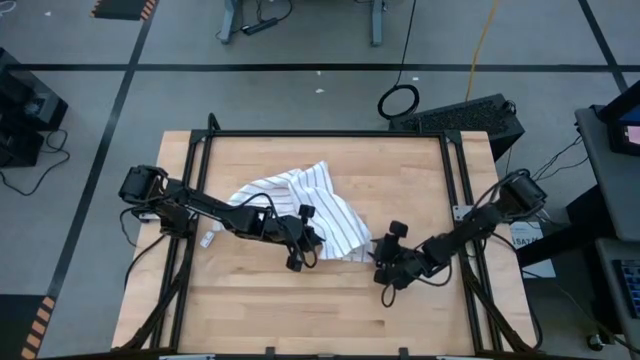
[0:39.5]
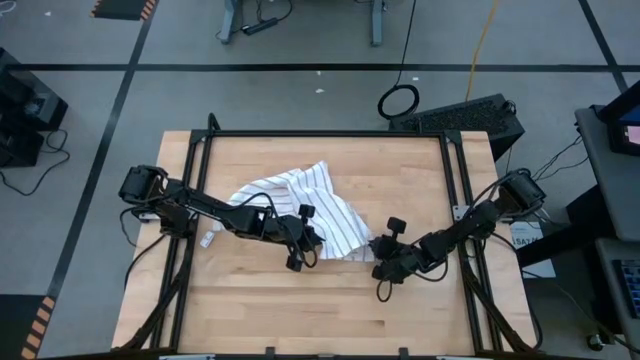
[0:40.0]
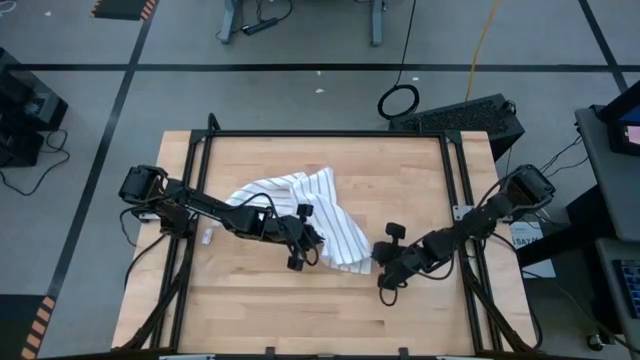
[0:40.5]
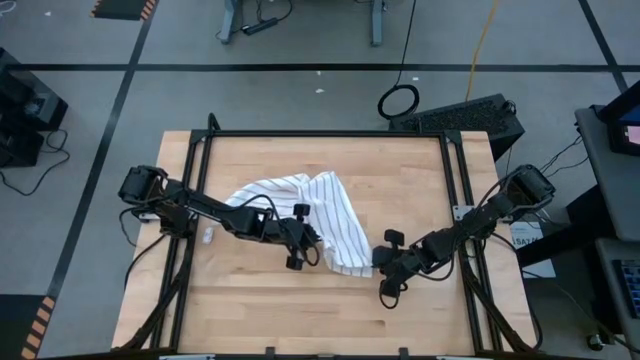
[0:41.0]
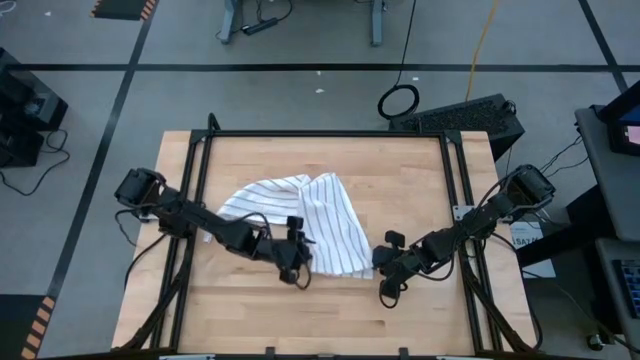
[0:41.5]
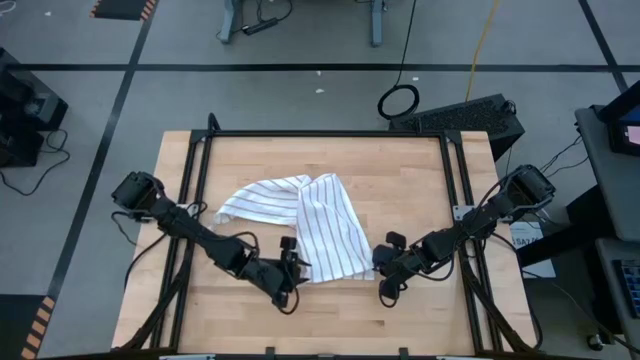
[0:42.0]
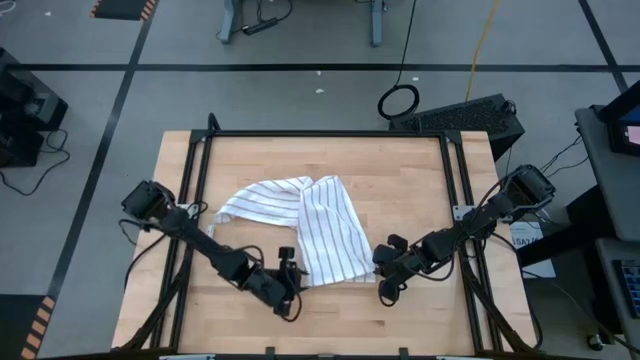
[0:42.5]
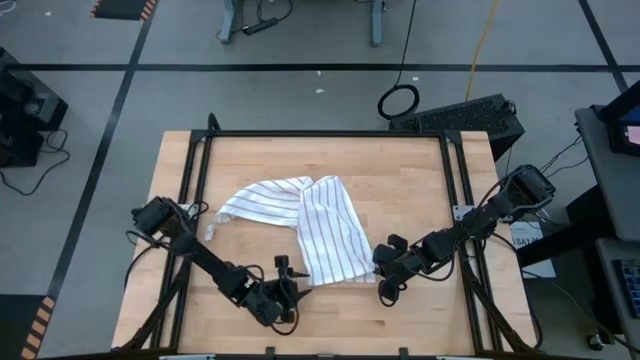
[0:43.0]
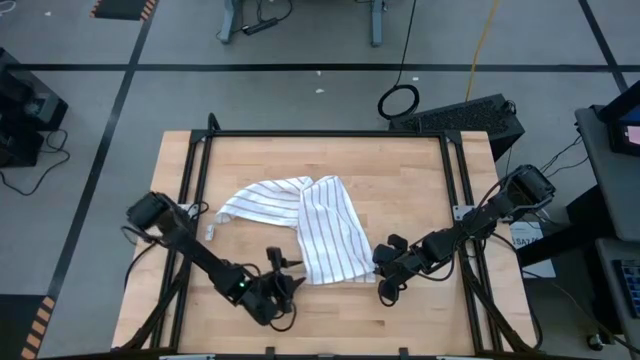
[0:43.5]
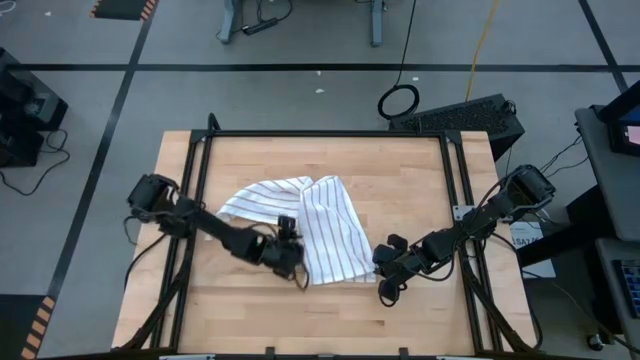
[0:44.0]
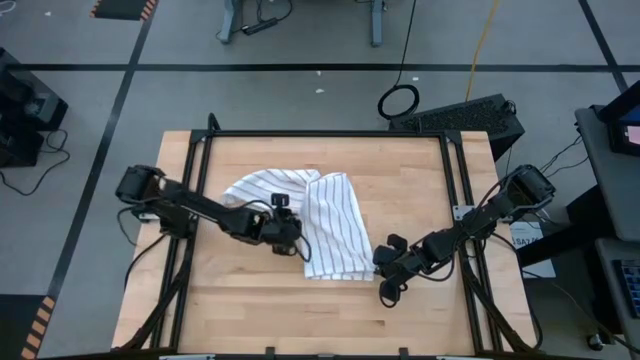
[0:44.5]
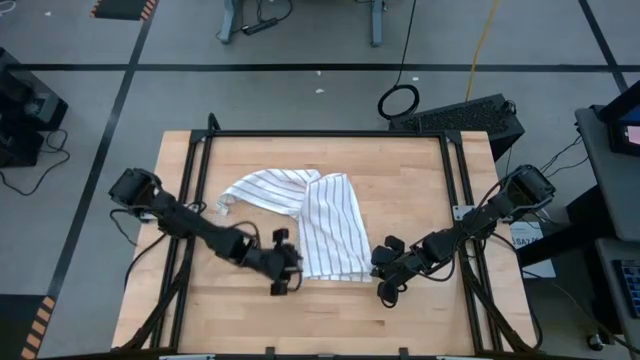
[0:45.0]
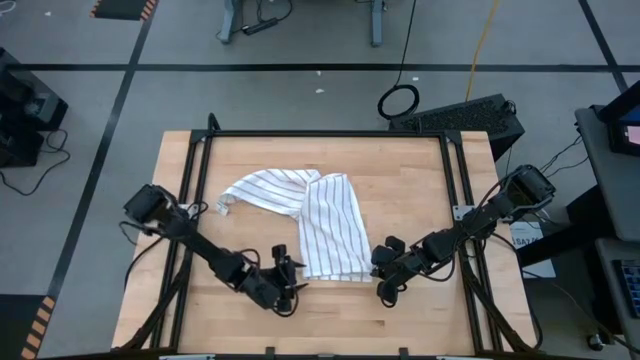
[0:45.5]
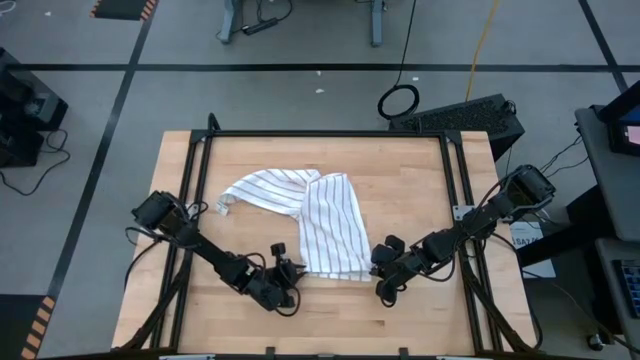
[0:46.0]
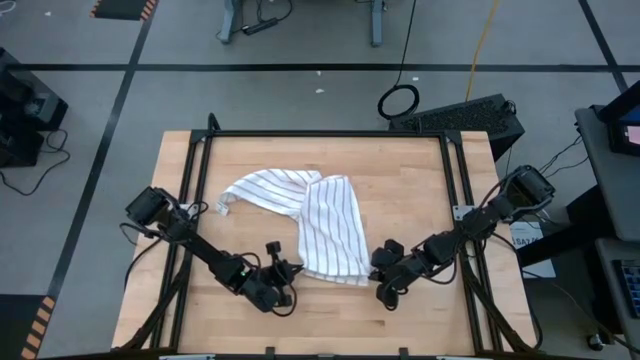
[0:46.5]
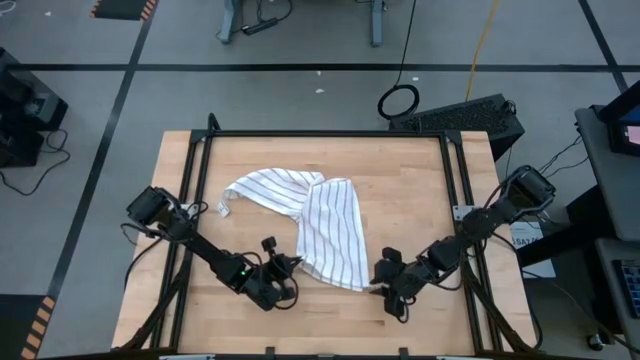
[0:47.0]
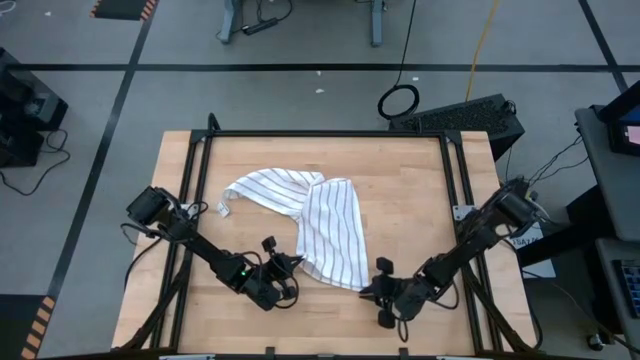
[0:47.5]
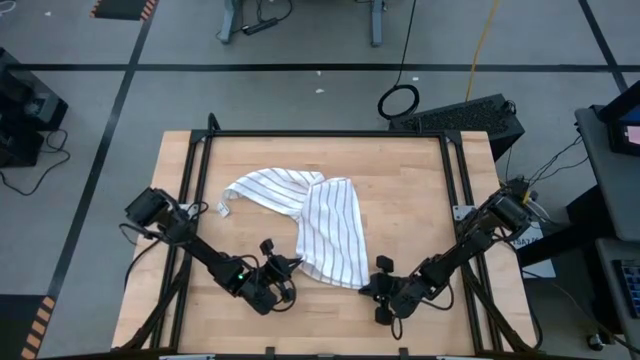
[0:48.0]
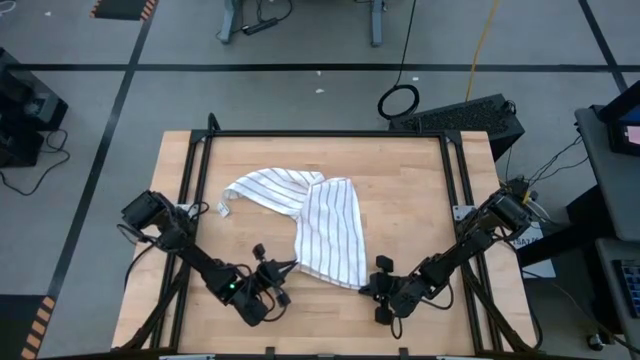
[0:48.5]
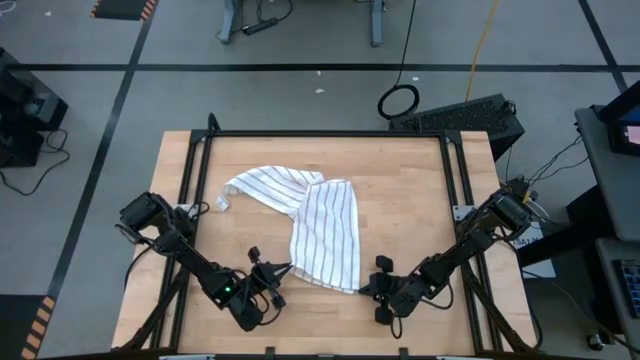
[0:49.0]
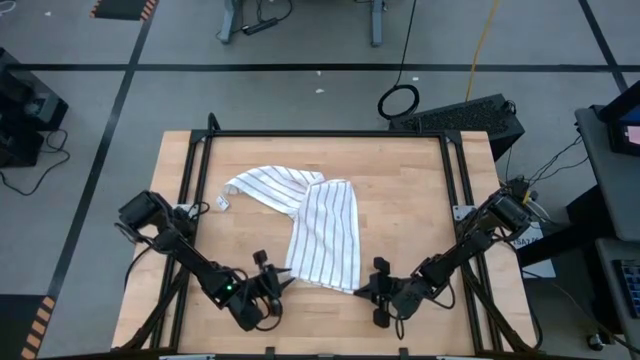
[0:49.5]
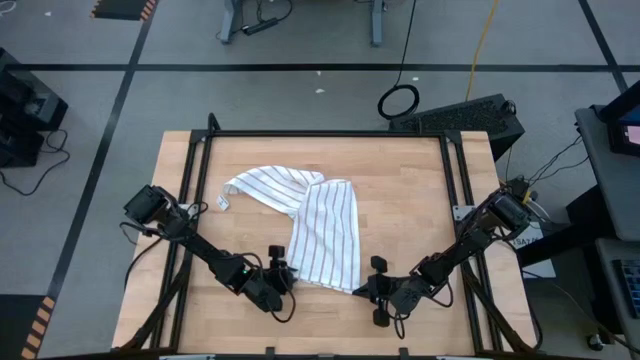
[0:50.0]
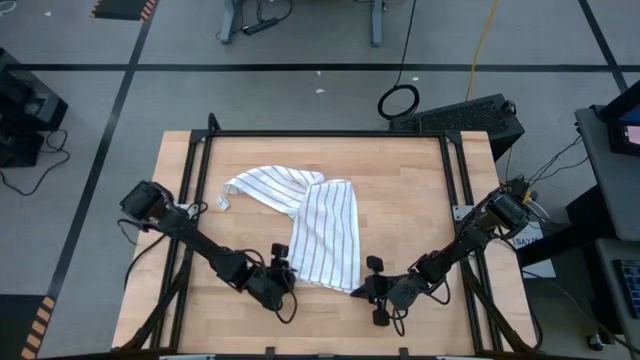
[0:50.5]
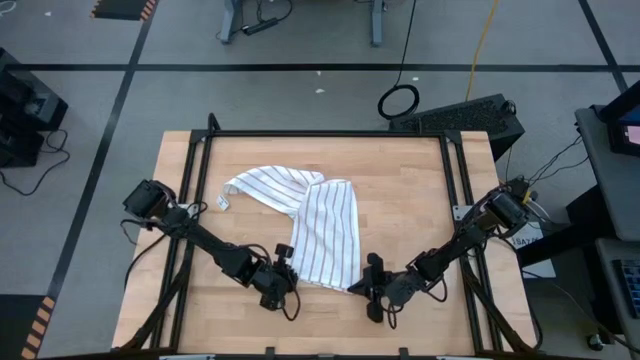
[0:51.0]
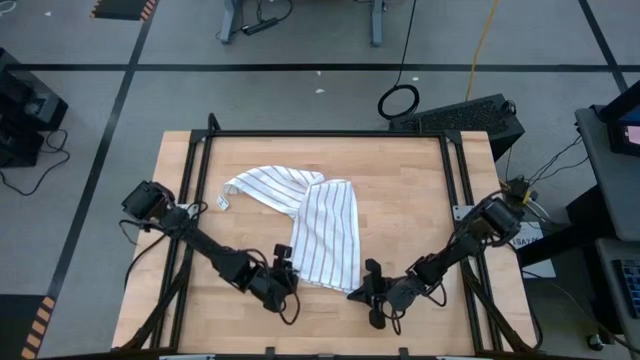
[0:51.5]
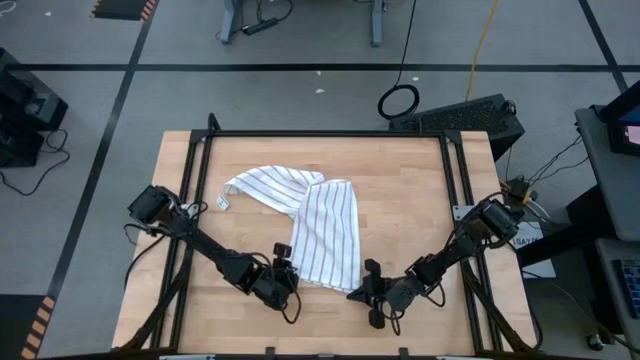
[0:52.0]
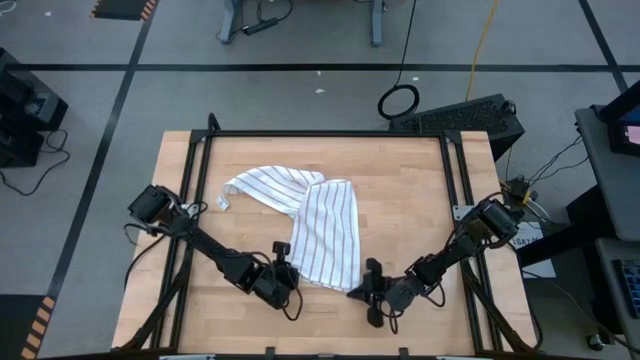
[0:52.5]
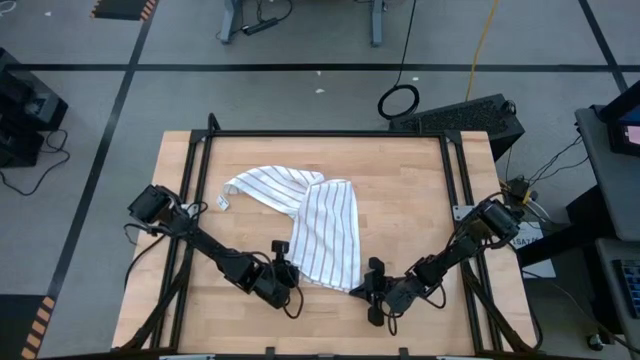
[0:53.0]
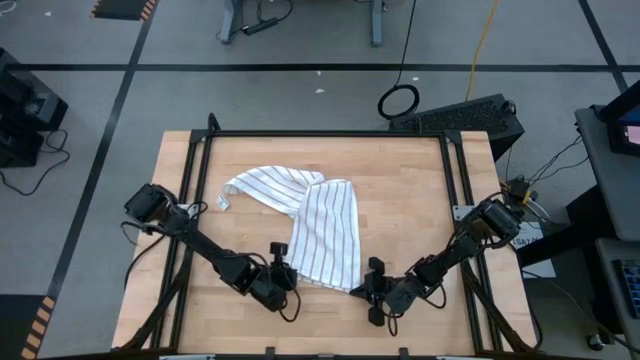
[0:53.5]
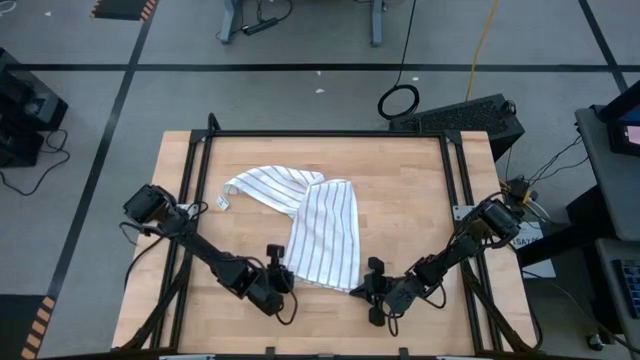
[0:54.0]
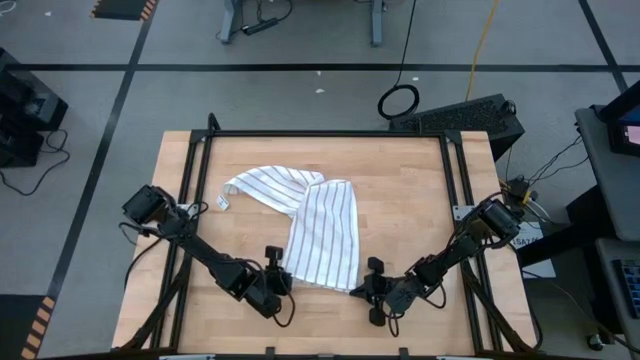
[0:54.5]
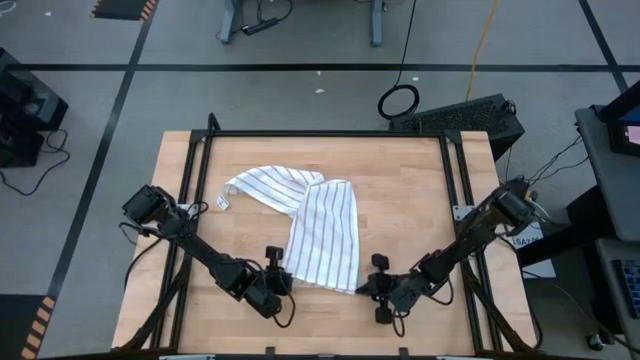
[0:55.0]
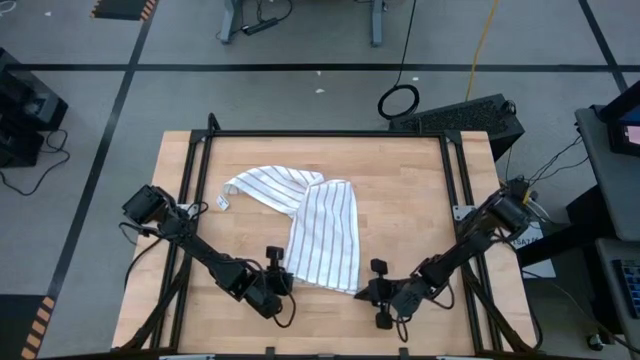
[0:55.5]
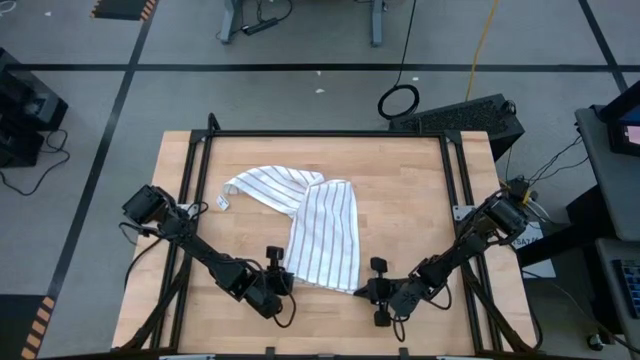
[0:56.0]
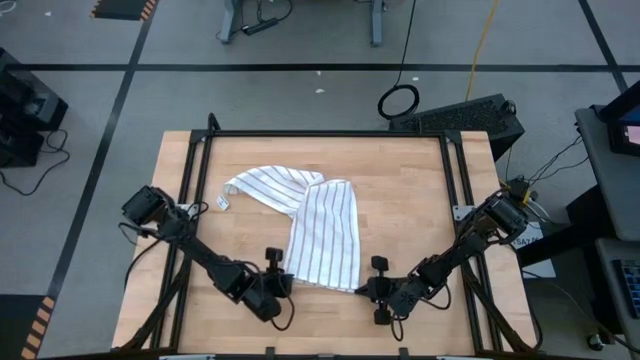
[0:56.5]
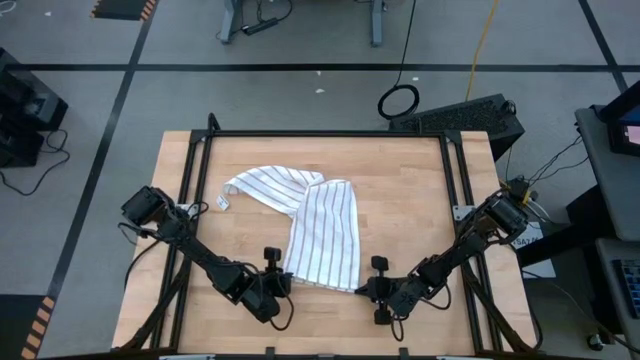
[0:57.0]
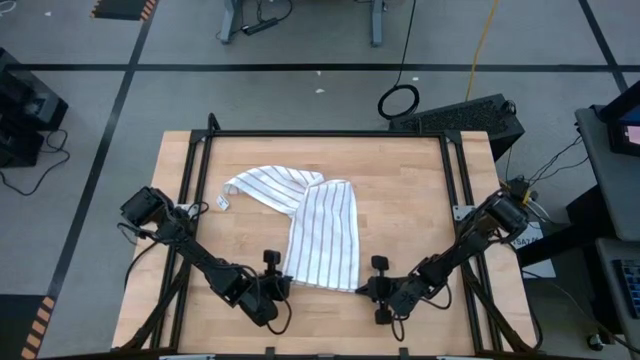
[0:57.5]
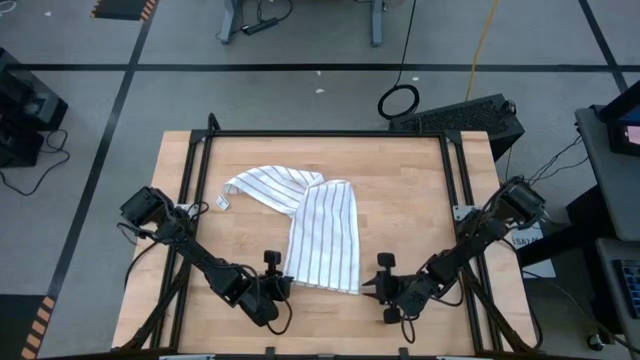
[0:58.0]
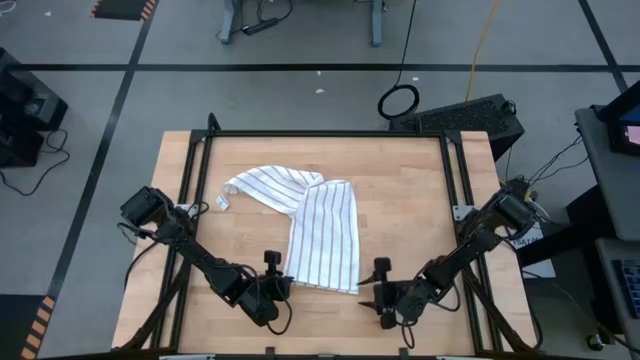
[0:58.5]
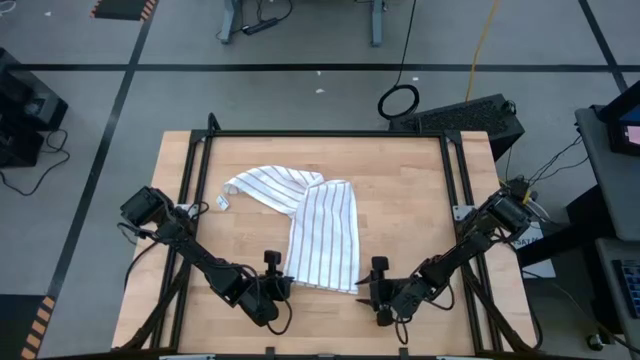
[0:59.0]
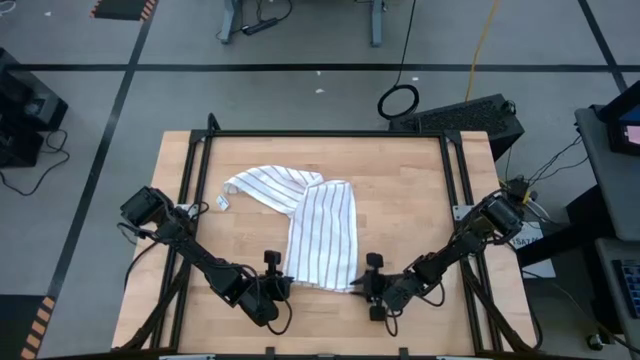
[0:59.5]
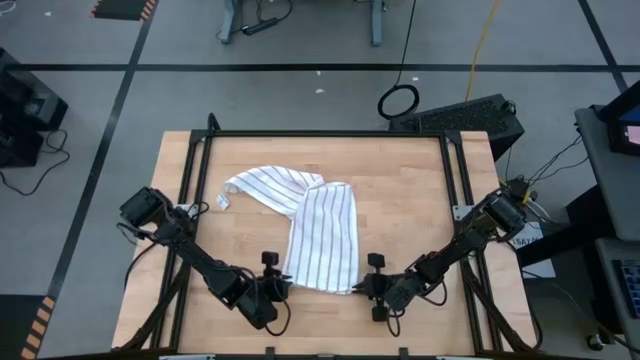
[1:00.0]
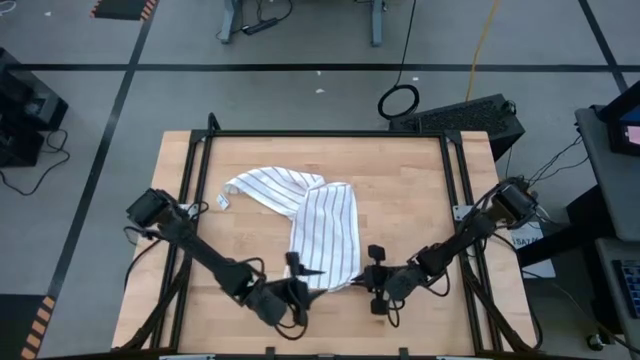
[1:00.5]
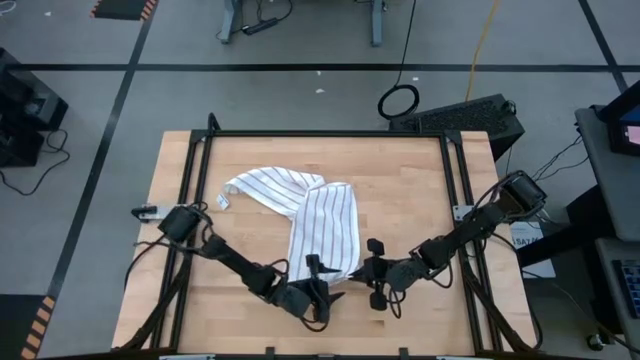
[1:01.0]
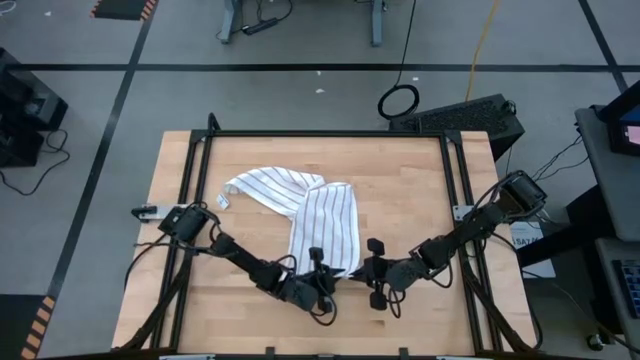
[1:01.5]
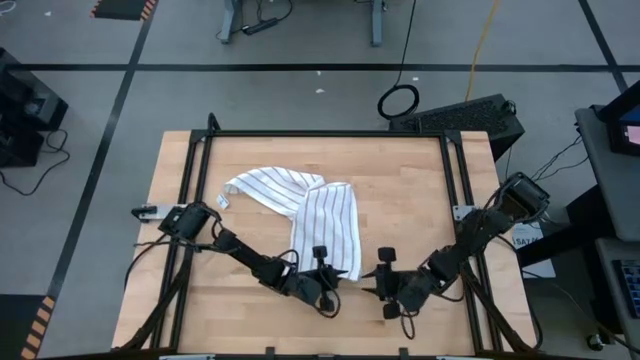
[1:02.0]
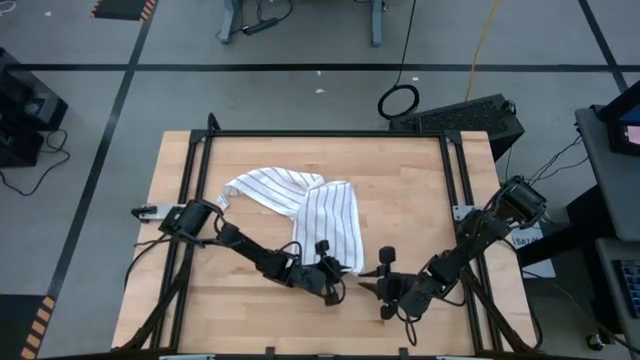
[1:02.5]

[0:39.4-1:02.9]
Task: Roll towel into tight, uniform cylinder
Fold the white brown kitchen towel
